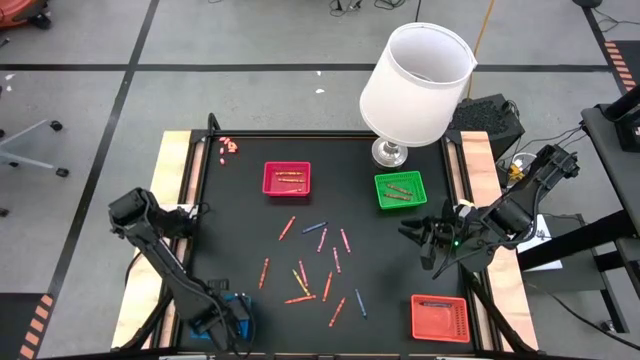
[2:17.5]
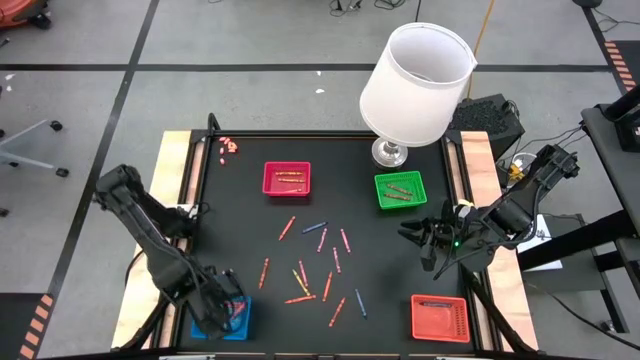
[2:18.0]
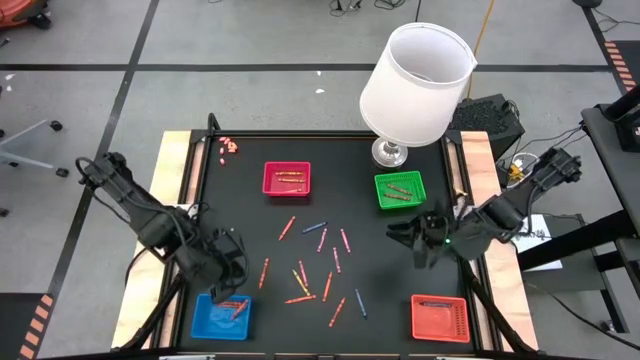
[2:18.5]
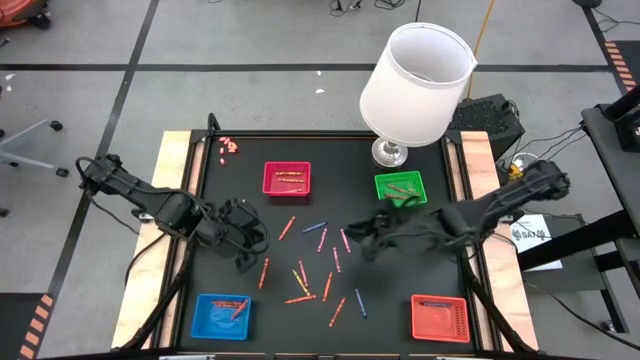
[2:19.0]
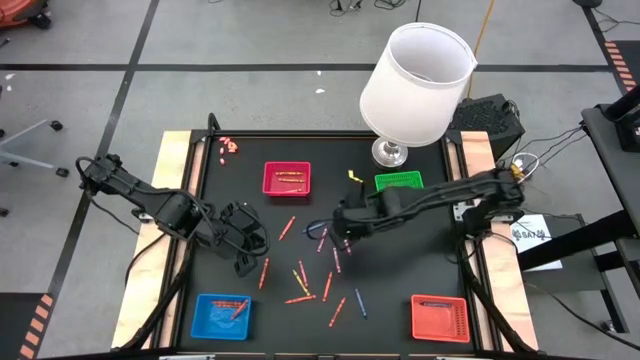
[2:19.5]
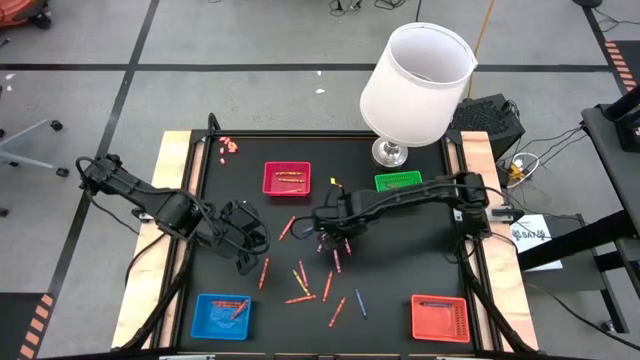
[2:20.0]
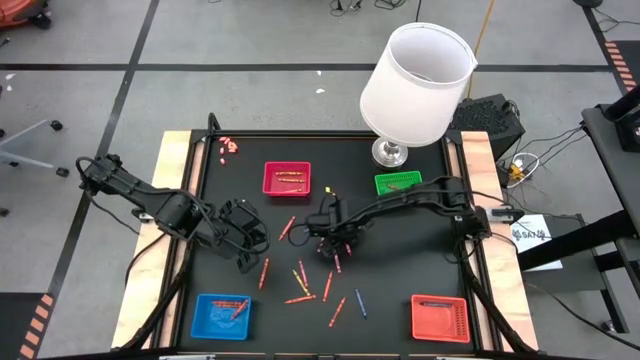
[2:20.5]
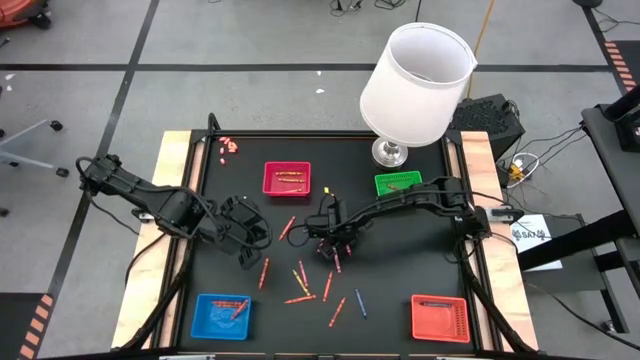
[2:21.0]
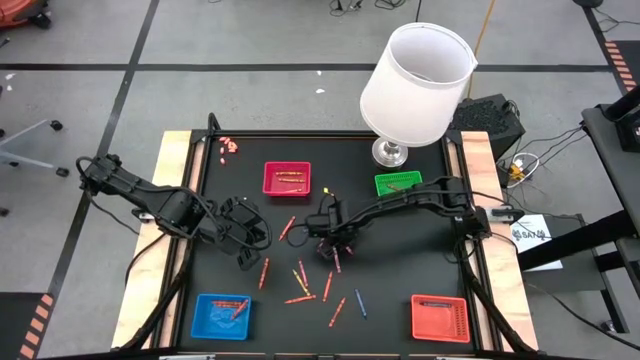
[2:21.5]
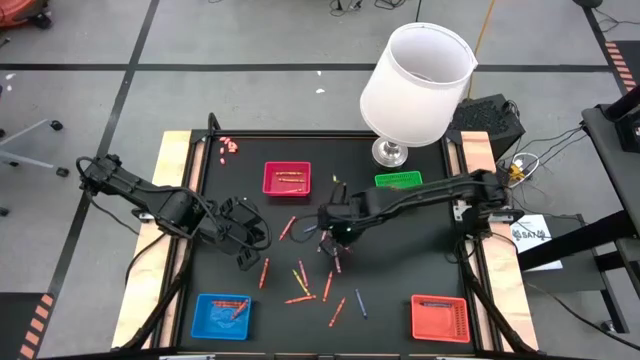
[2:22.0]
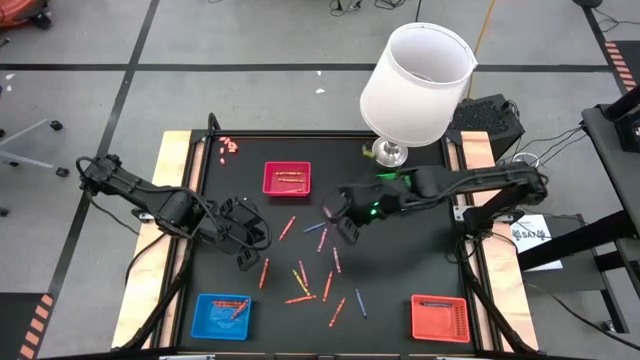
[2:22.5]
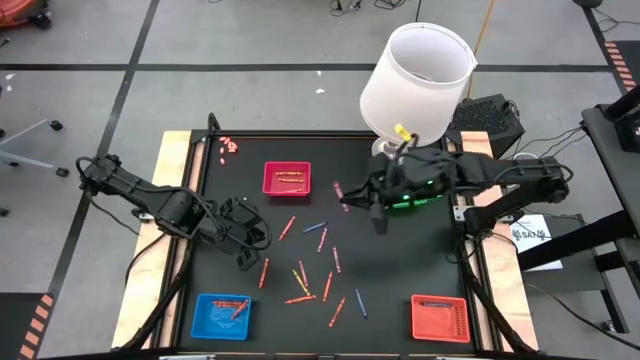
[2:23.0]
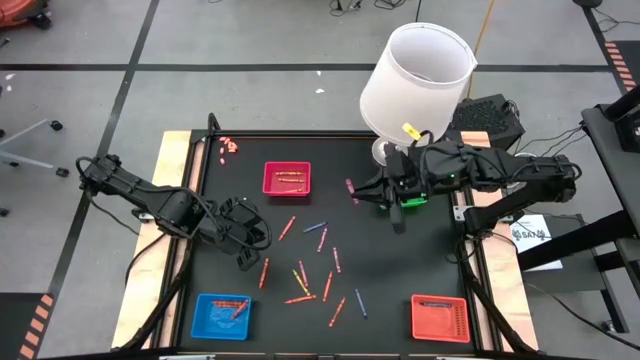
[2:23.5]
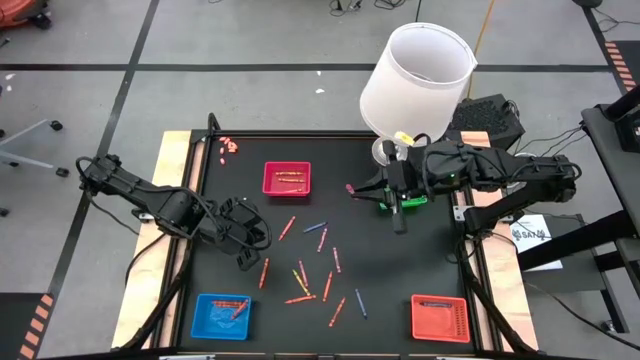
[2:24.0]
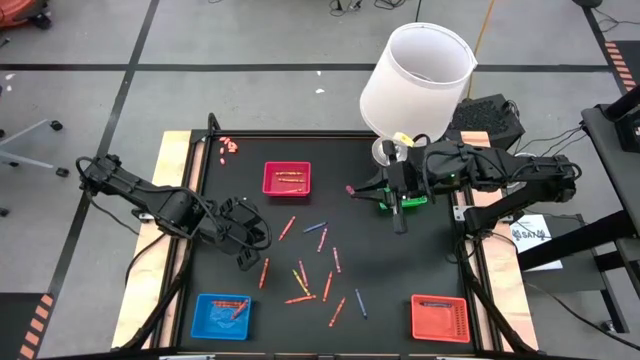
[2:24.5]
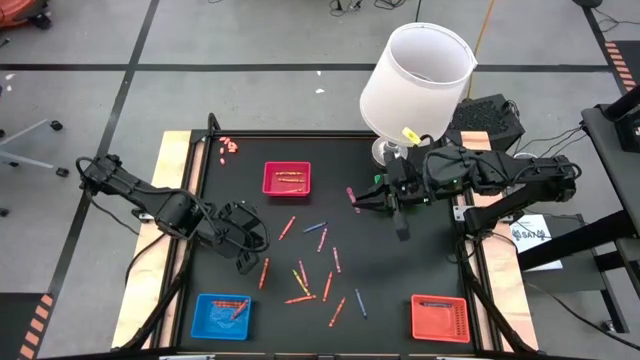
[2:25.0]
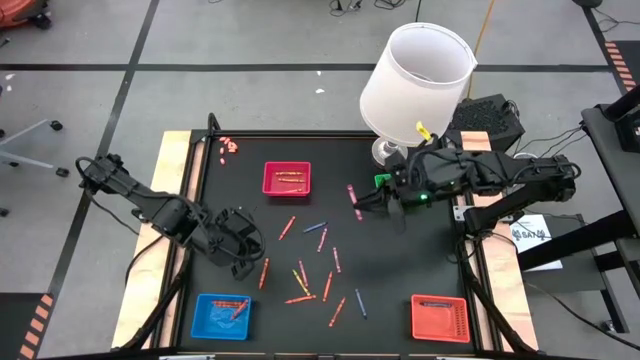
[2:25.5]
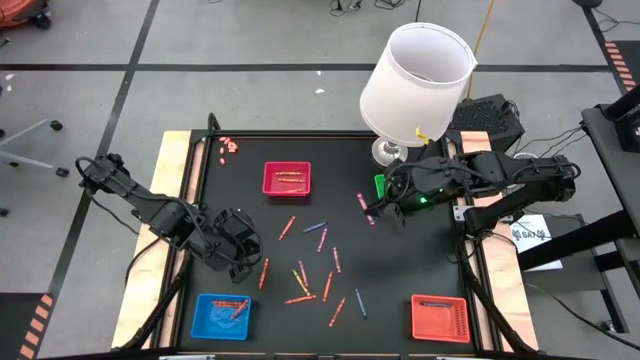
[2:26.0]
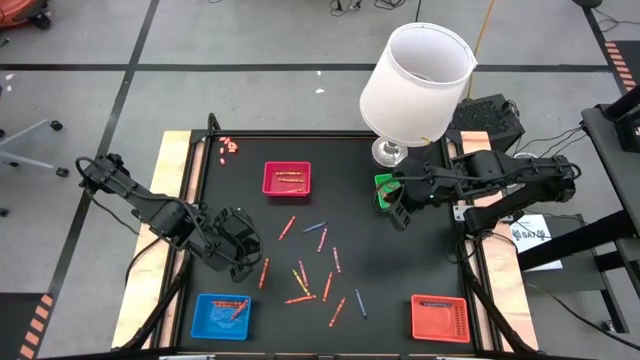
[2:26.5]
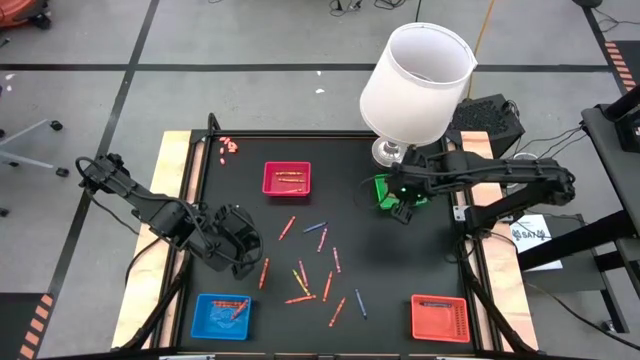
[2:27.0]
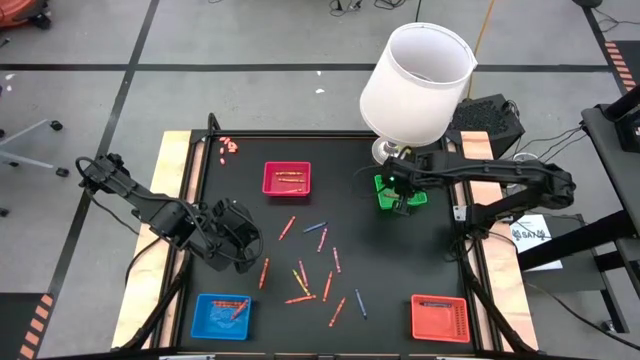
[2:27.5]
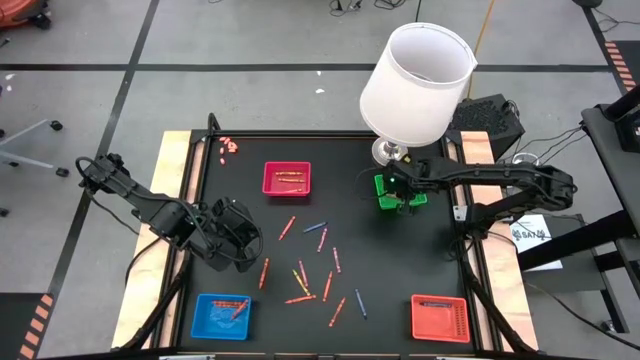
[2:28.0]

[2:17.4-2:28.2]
Task: Sort crayons
Put the red crayon into the green basket

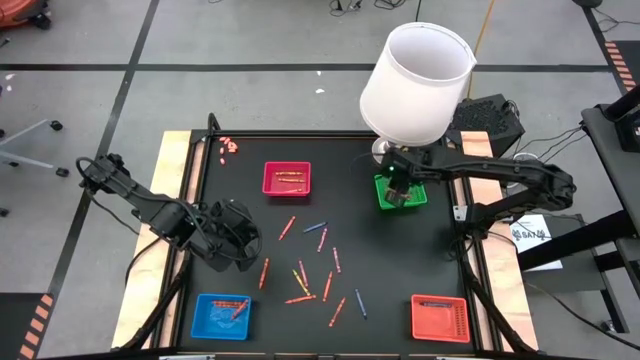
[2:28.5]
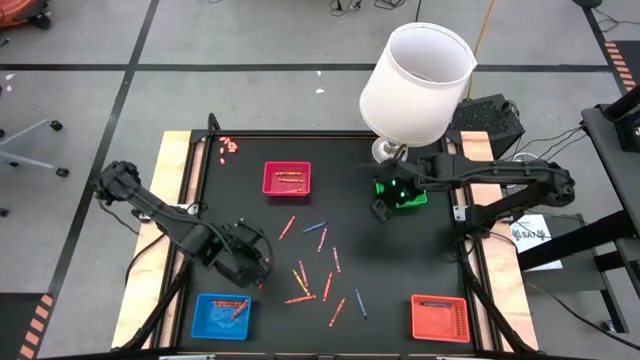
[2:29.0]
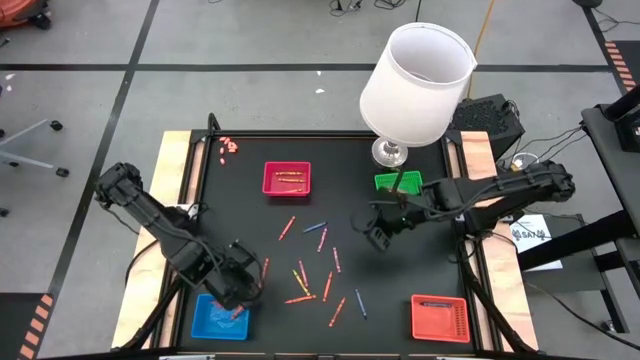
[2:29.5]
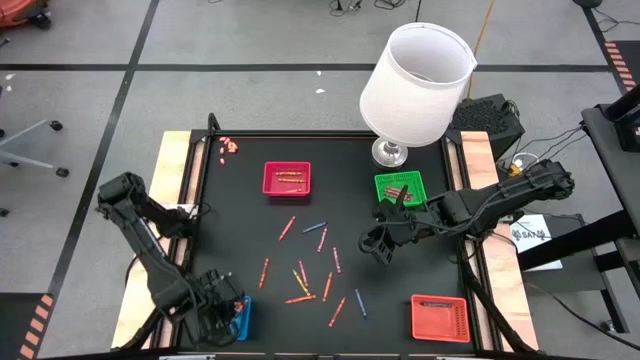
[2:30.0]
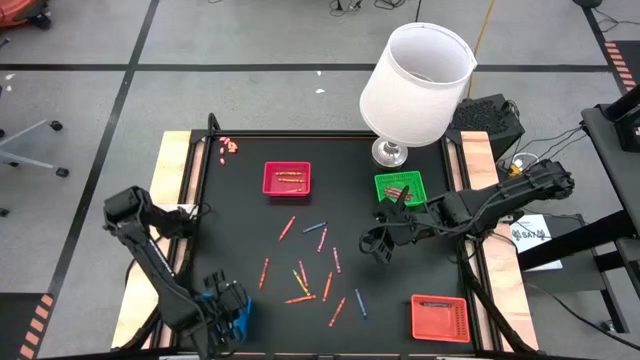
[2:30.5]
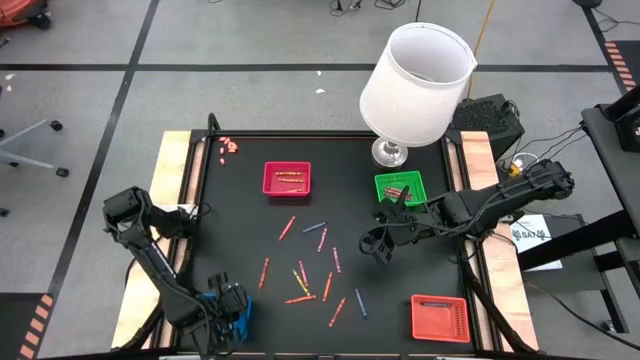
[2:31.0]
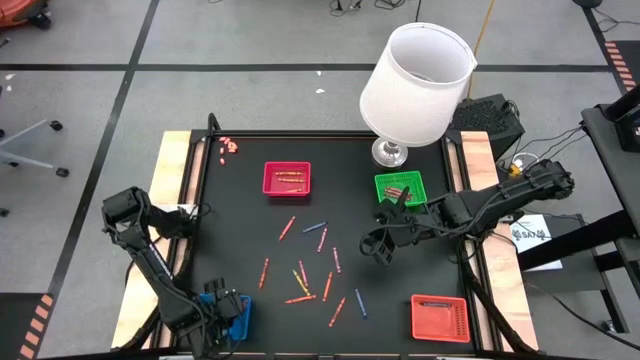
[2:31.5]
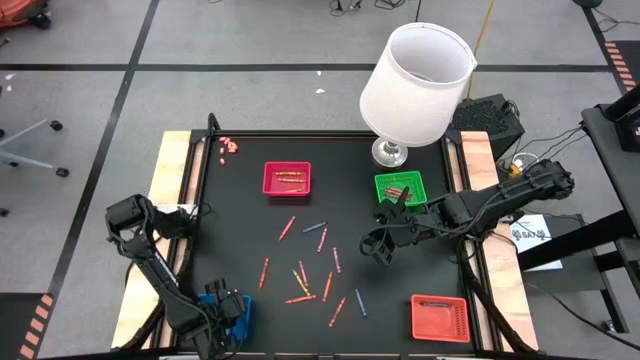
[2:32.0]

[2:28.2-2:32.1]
Adjust the orange crayon in the blue basket

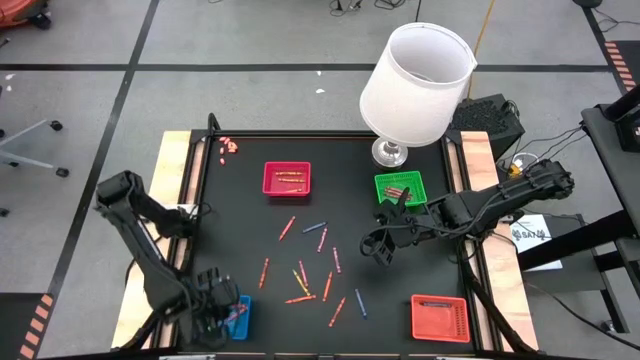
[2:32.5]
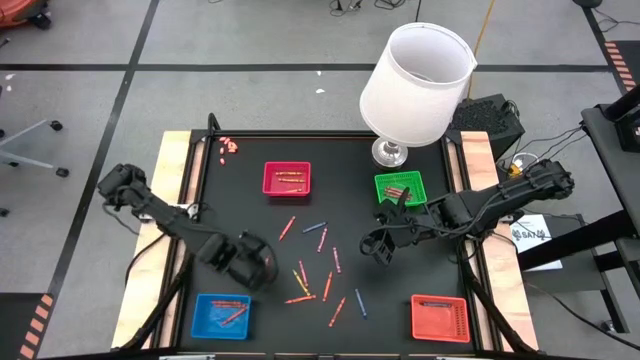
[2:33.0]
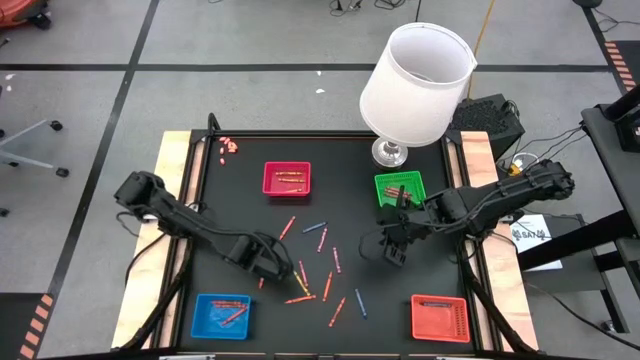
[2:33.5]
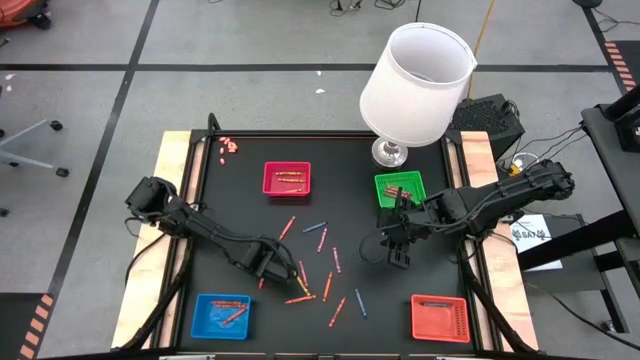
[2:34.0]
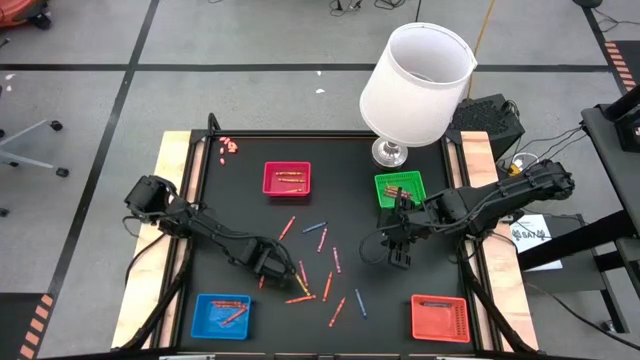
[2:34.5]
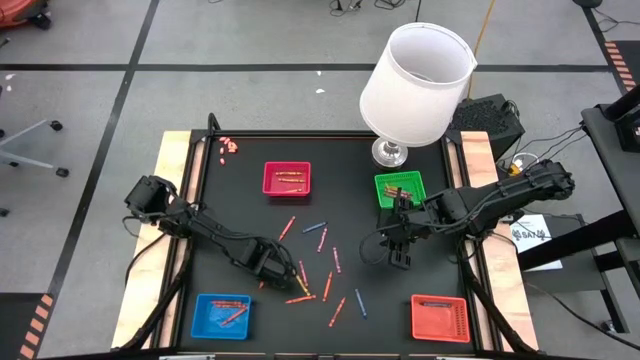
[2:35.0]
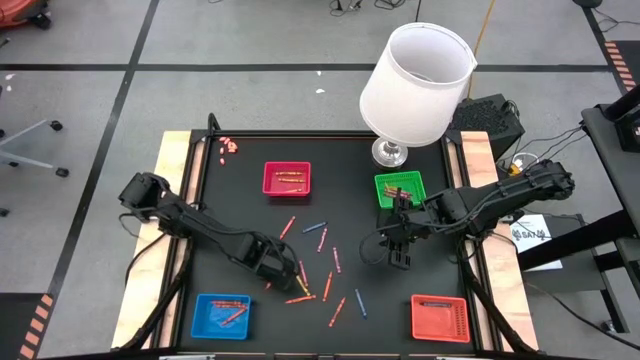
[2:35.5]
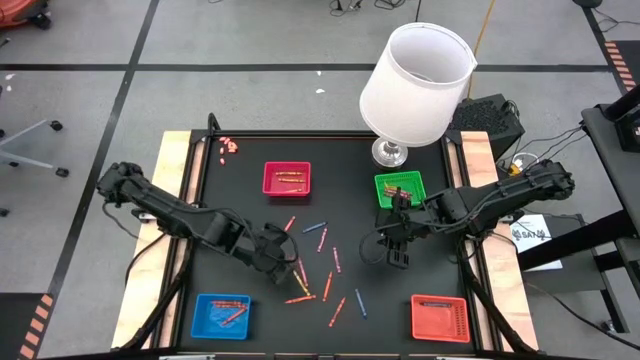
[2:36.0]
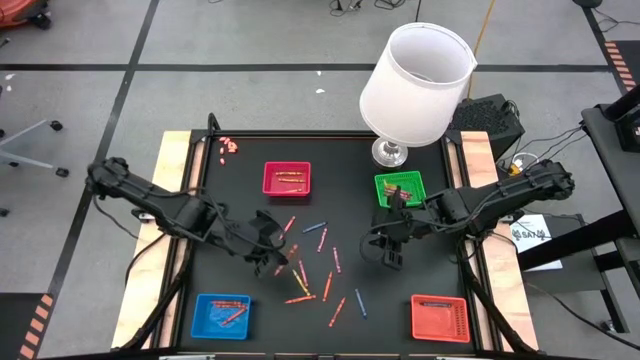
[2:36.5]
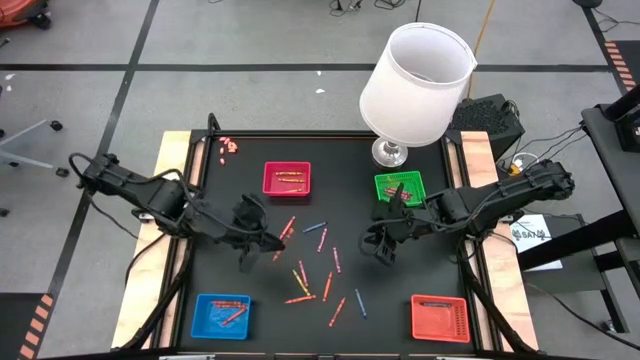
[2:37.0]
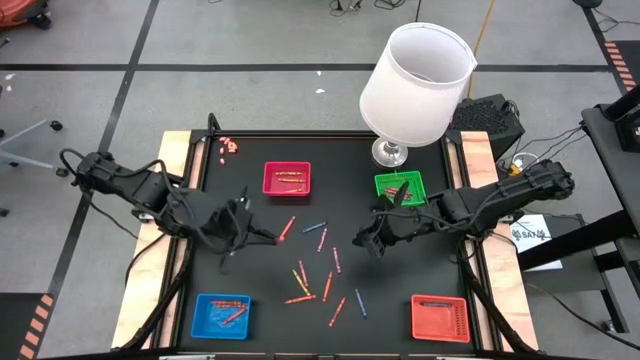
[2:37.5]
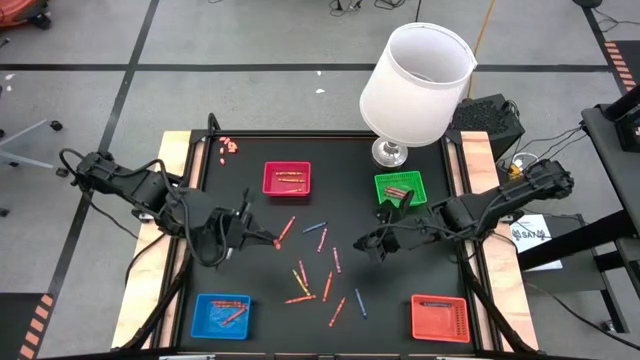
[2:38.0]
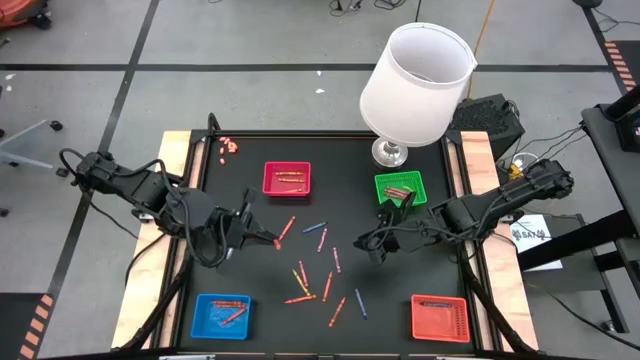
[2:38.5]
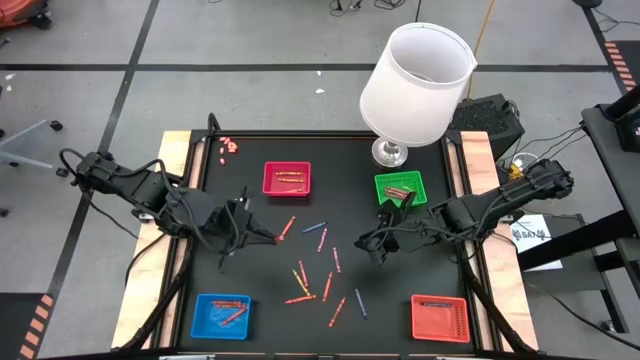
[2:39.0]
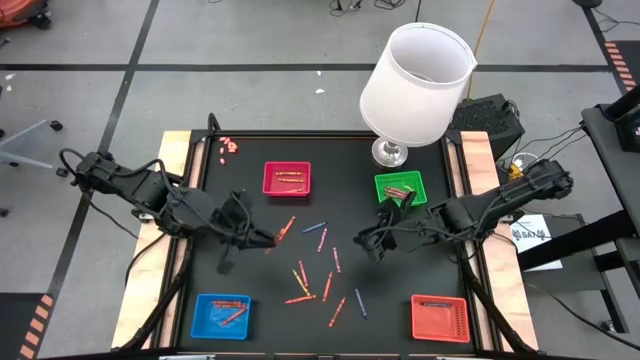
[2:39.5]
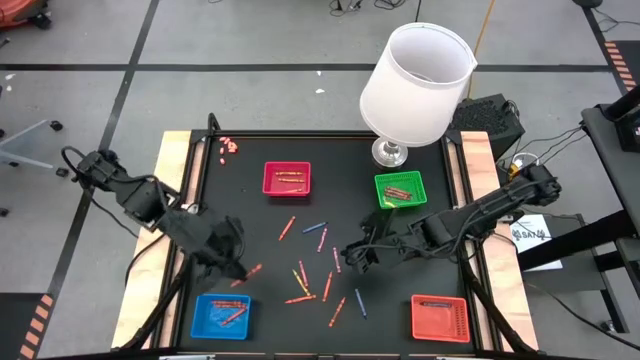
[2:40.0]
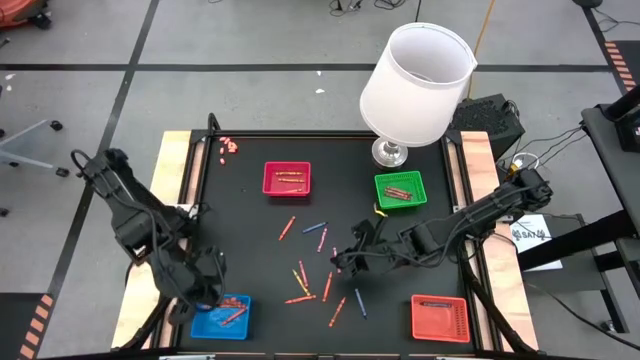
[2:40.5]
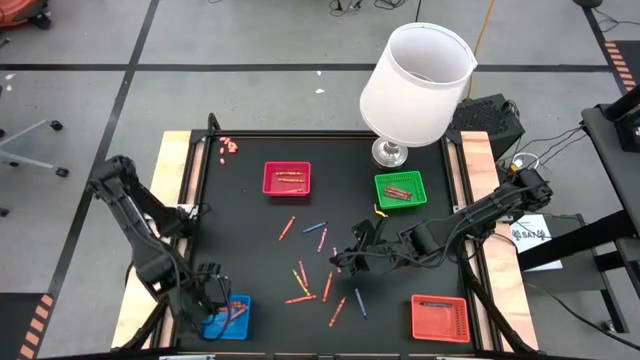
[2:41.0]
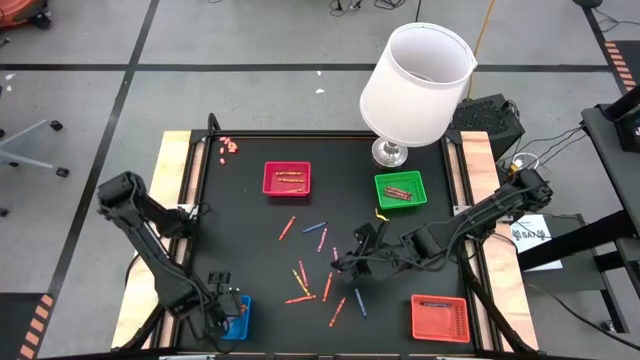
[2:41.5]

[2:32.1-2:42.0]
Put the orange crayon into the blue basket
